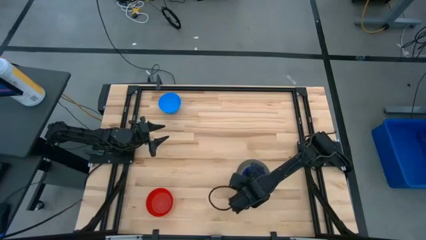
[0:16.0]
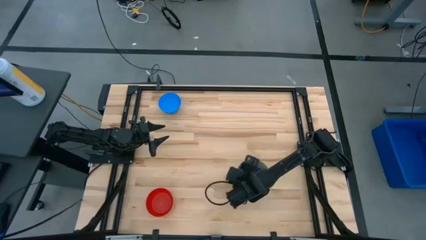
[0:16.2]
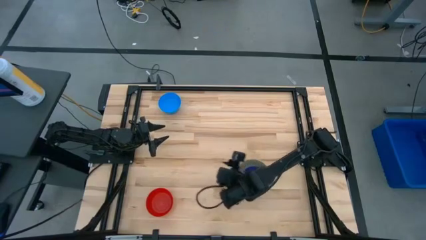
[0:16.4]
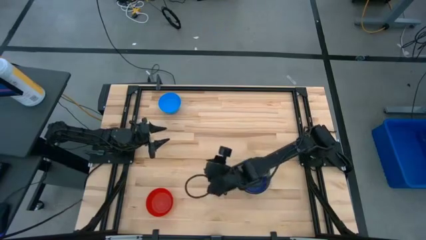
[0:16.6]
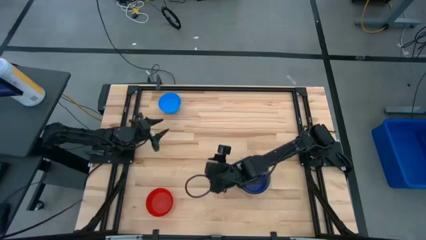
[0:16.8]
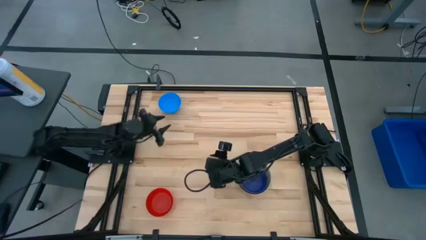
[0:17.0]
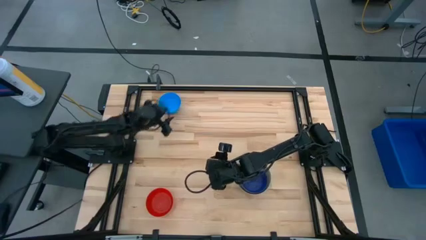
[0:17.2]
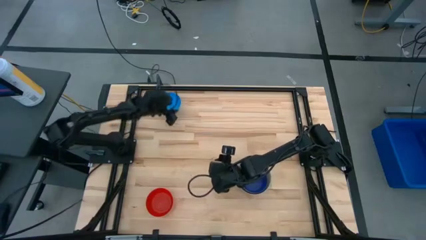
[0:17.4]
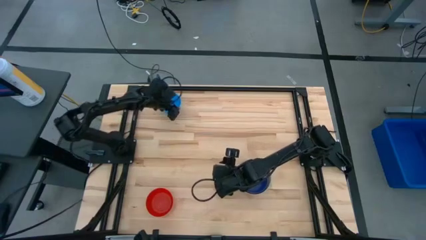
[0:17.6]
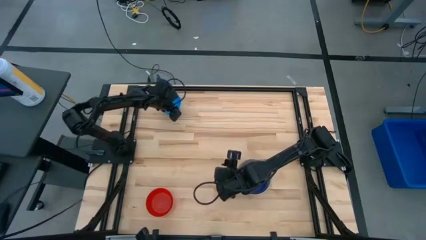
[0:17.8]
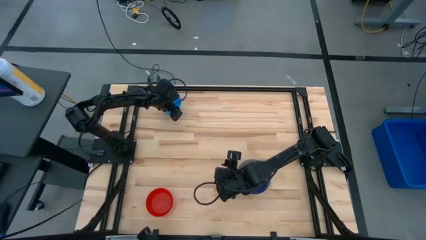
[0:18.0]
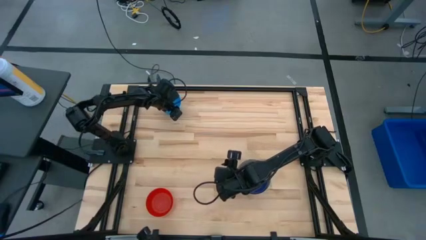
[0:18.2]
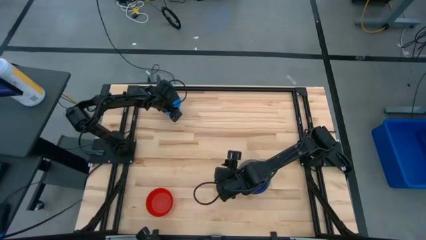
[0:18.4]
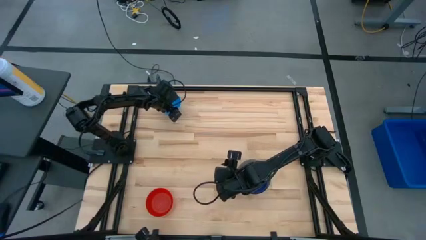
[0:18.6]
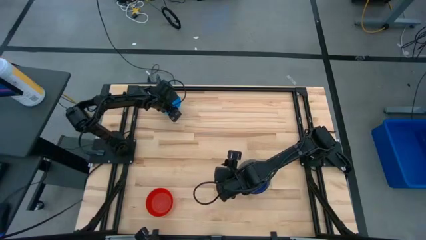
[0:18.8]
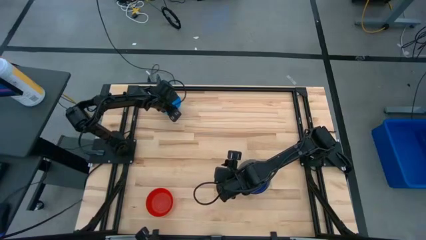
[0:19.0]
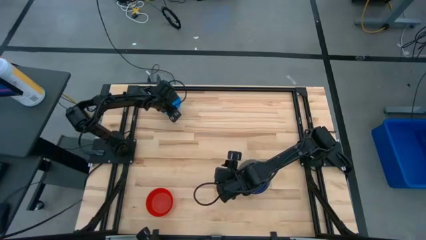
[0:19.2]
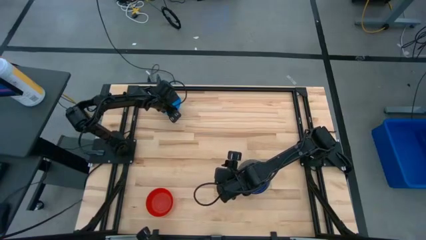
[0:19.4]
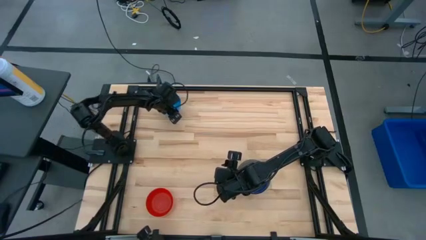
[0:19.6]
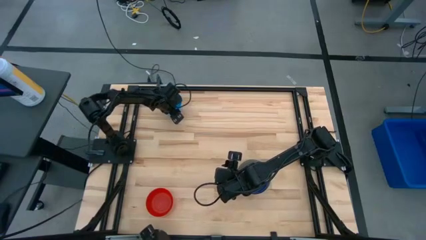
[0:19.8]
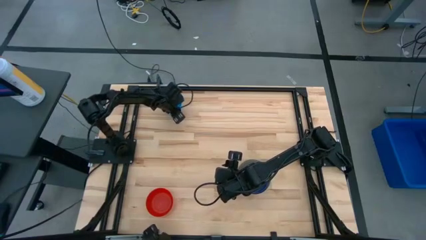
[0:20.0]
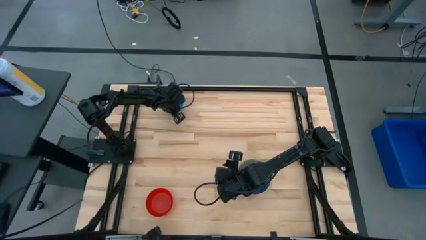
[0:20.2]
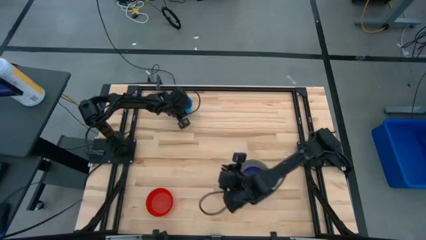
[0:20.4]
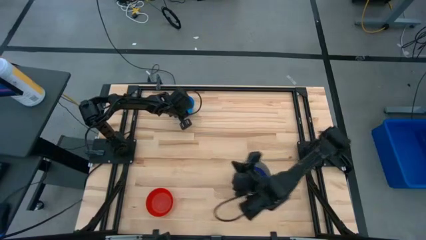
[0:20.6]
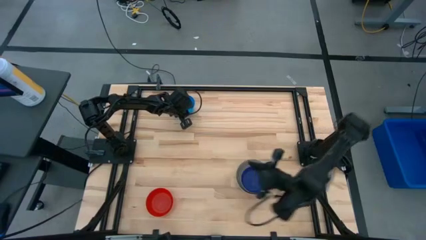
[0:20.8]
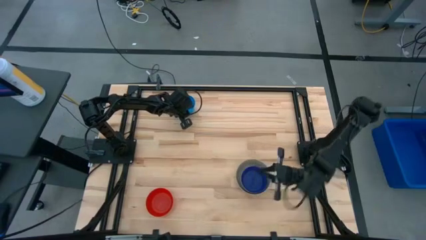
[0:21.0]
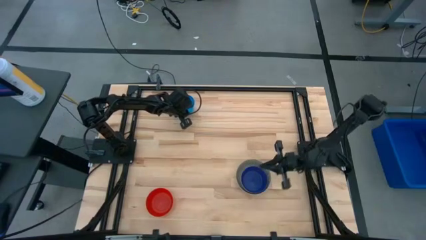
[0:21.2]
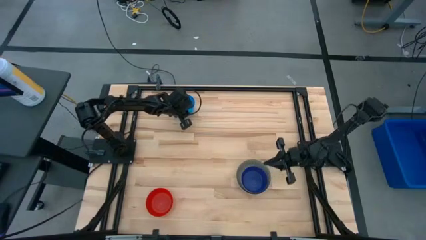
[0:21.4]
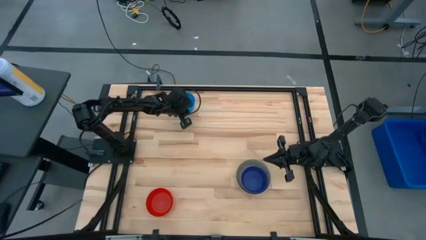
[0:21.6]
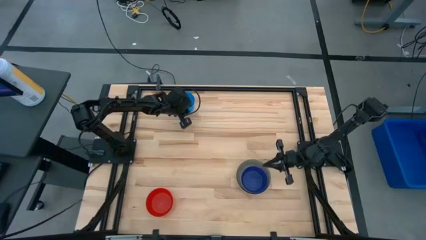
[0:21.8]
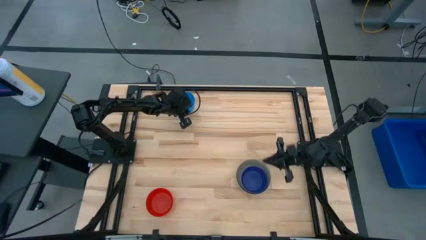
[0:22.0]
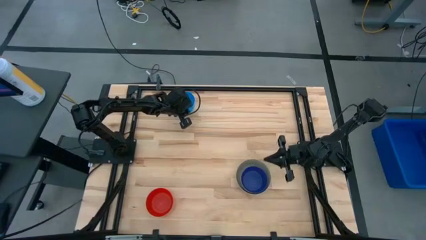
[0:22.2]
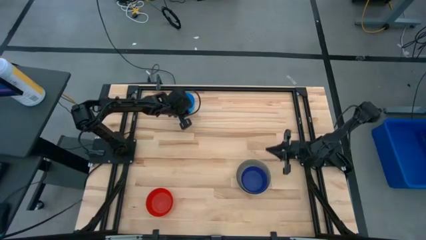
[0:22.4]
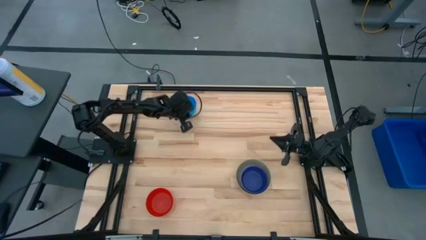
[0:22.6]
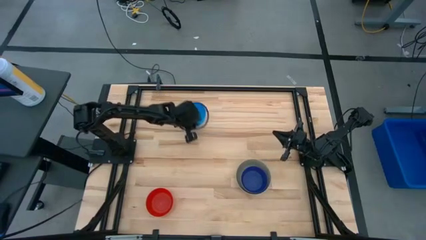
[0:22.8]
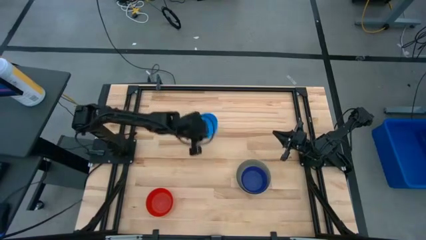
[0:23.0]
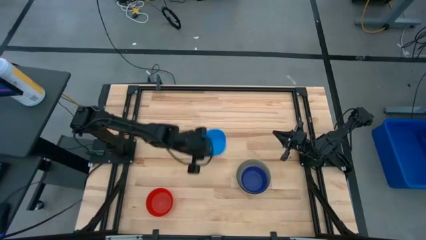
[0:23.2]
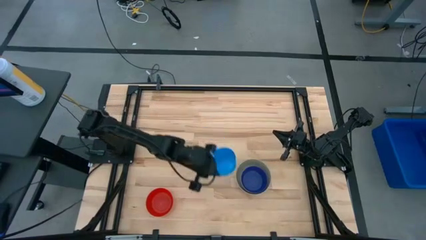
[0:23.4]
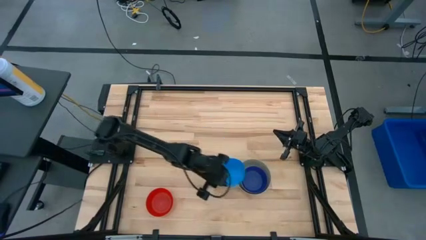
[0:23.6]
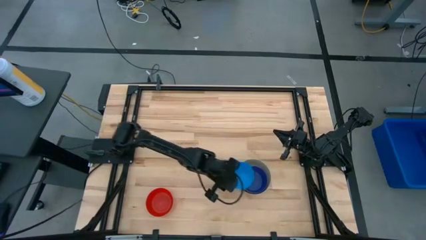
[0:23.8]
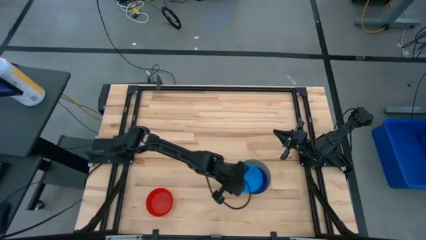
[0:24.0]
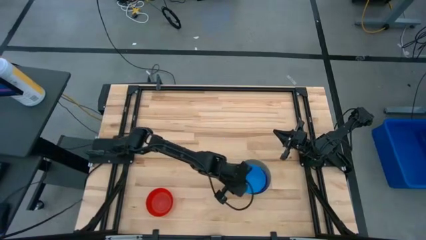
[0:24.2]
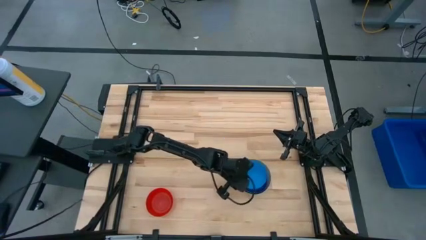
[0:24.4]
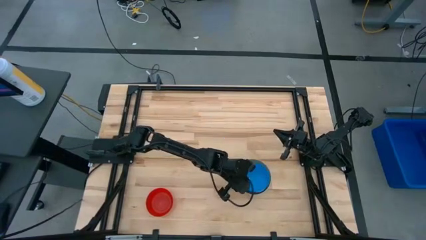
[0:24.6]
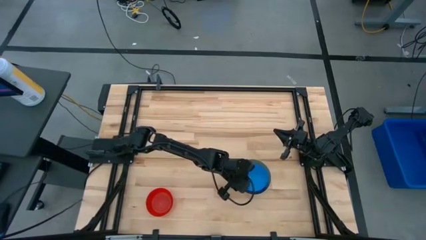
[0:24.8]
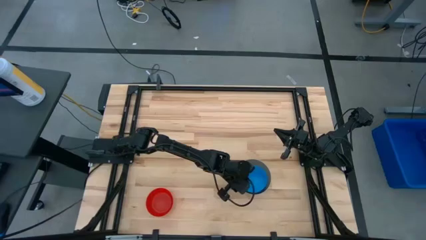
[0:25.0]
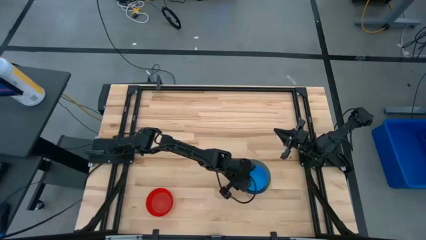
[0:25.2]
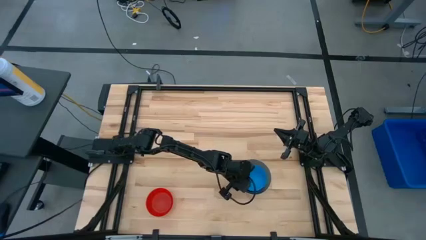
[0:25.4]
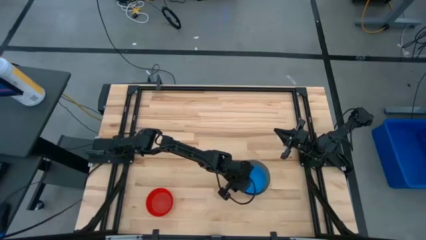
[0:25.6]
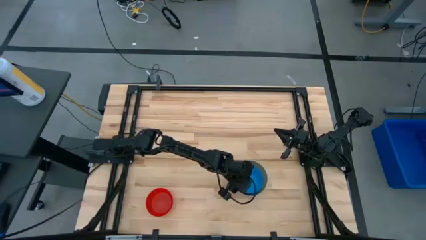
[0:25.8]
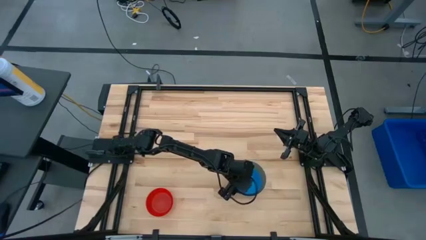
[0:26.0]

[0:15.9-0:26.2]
Stack the blue bowl on the dark blue bowl

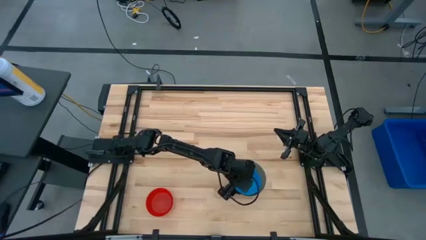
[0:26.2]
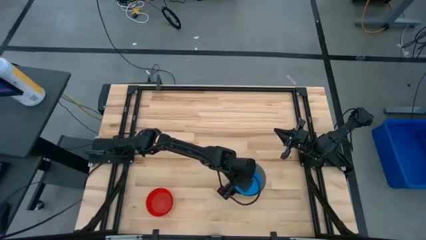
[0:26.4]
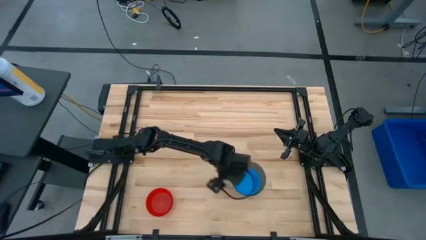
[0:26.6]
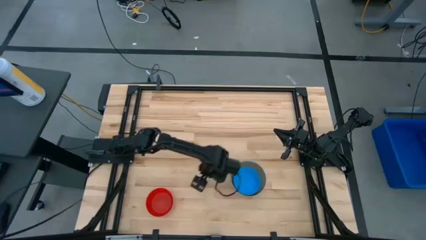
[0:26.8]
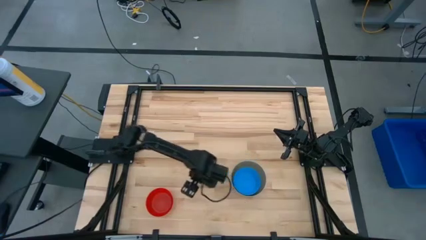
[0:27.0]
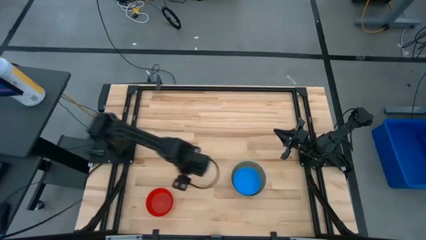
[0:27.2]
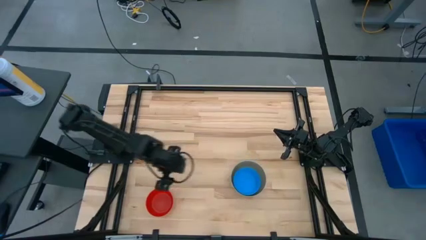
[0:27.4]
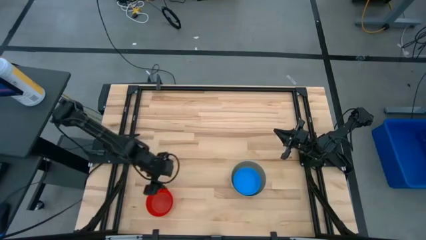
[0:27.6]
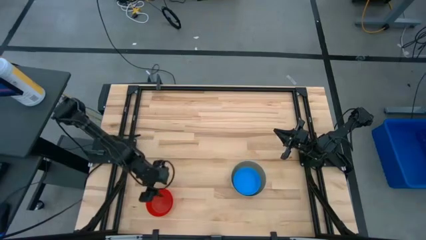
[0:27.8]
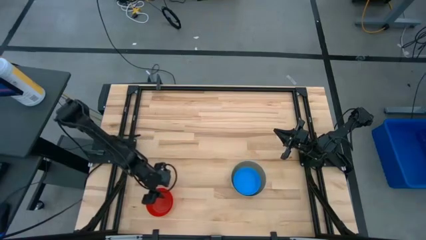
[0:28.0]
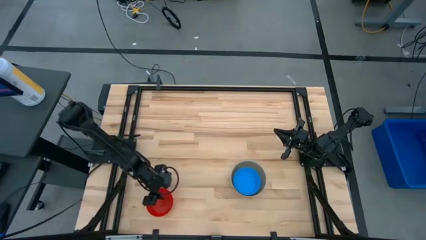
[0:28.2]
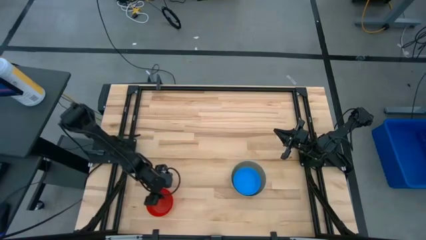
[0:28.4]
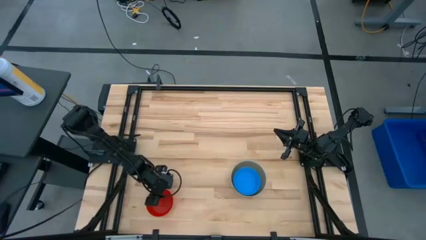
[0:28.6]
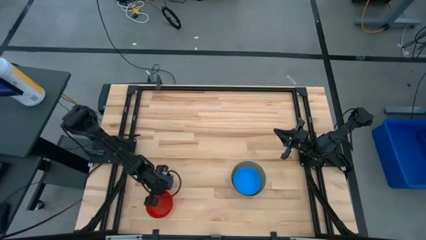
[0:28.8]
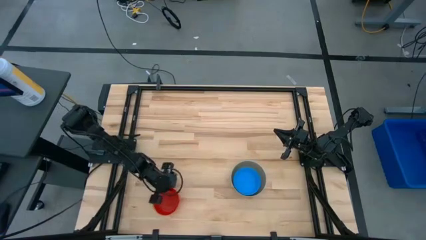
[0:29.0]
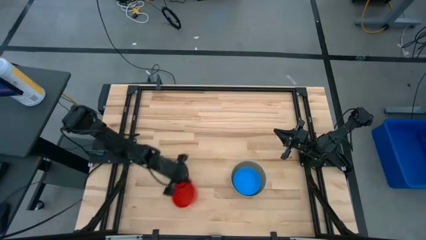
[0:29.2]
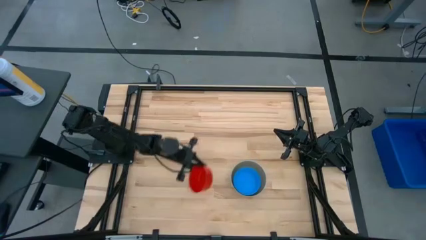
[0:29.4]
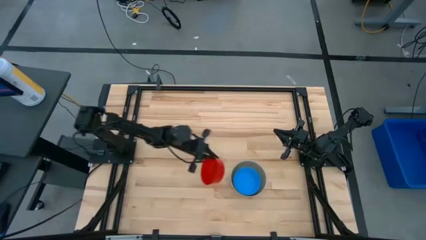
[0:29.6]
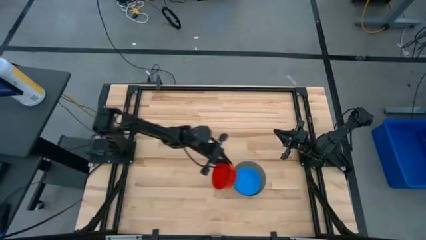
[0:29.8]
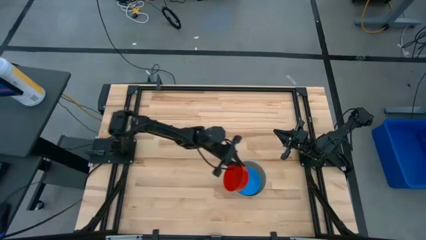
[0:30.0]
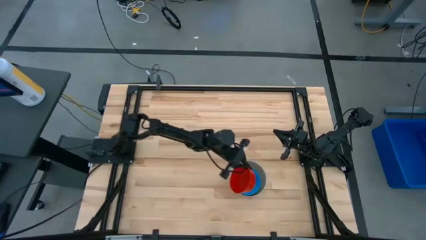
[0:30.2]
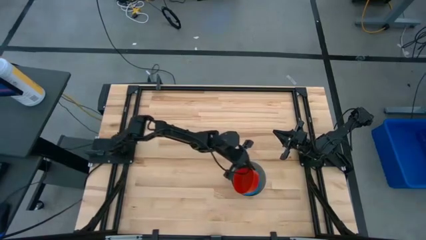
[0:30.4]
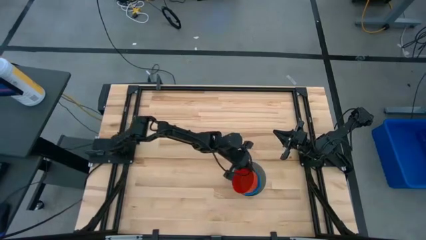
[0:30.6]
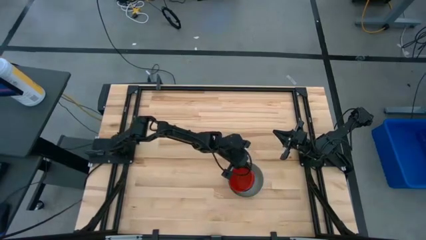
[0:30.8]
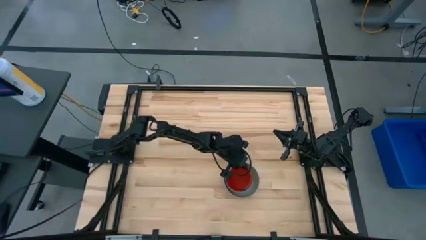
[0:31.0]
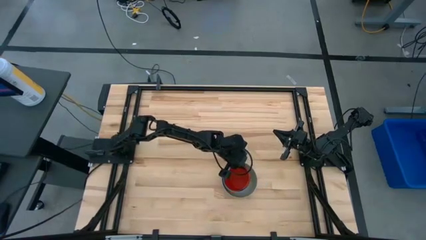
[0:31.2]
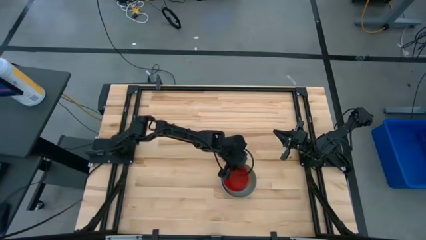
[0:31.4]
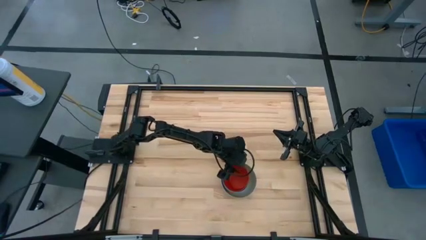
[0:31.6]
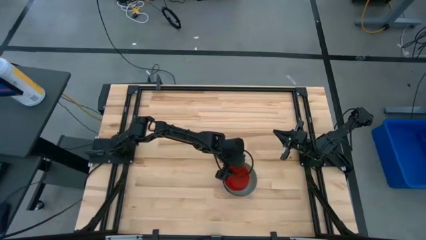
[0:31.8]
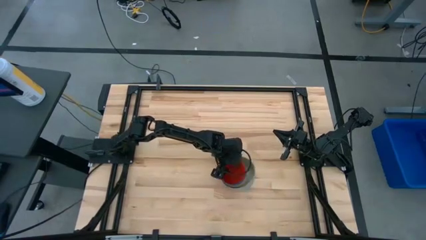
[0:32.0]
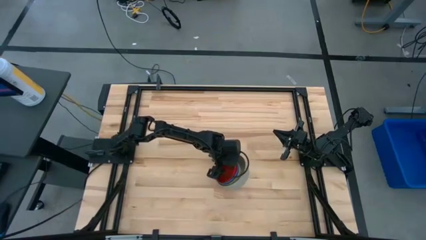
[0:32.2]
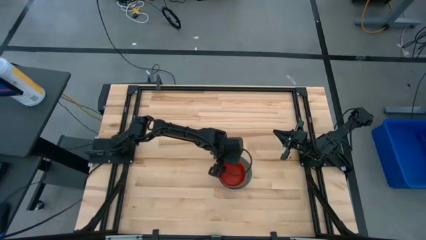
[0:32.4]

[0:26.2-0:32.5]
Stack the red bowl on the blue bowl
